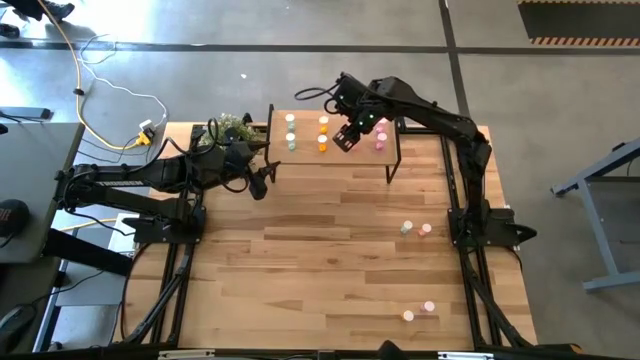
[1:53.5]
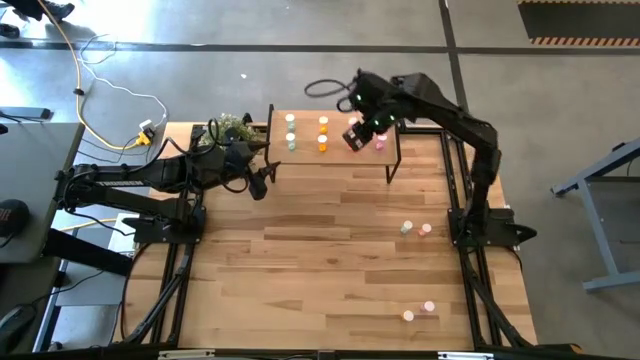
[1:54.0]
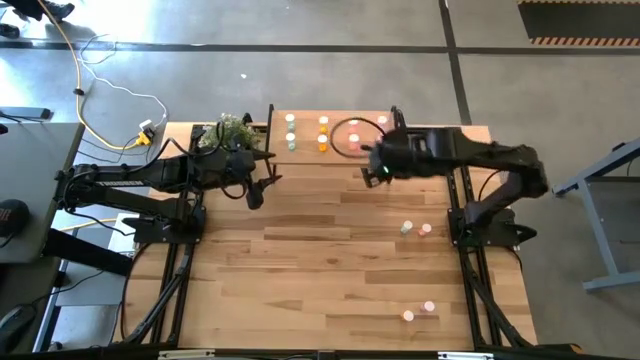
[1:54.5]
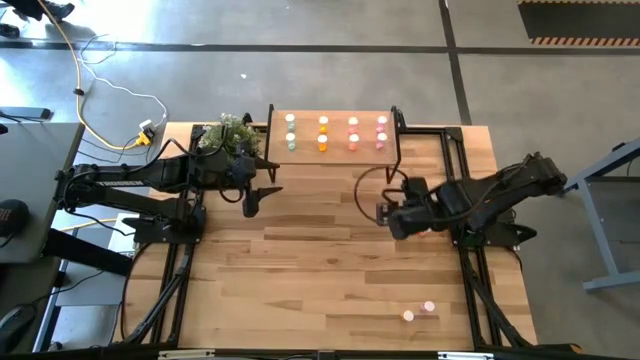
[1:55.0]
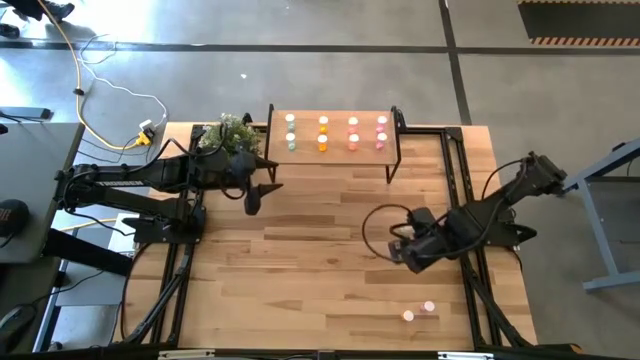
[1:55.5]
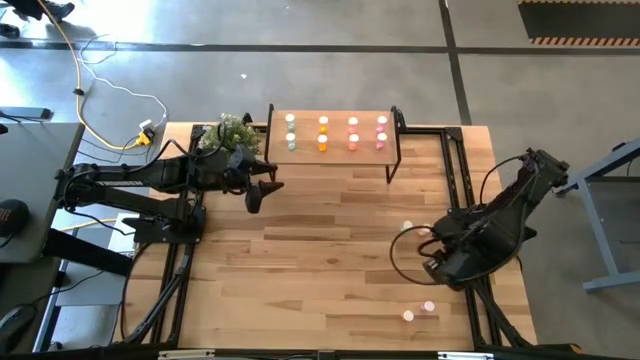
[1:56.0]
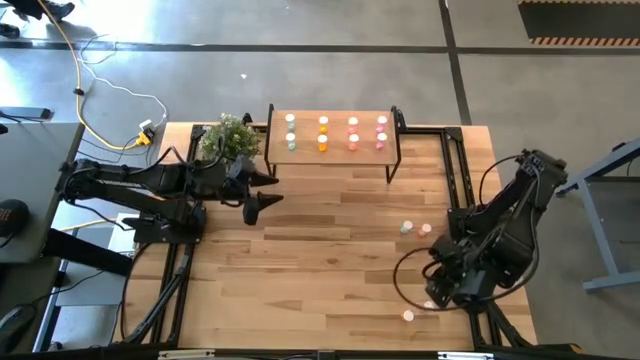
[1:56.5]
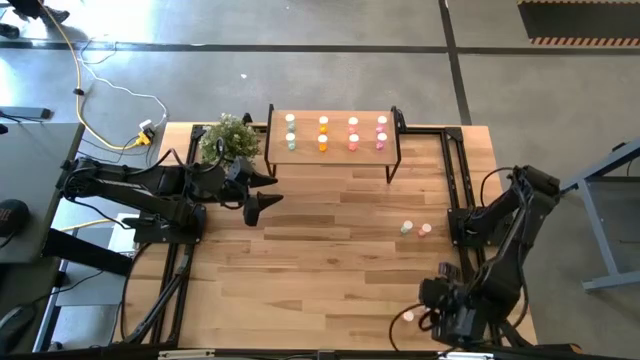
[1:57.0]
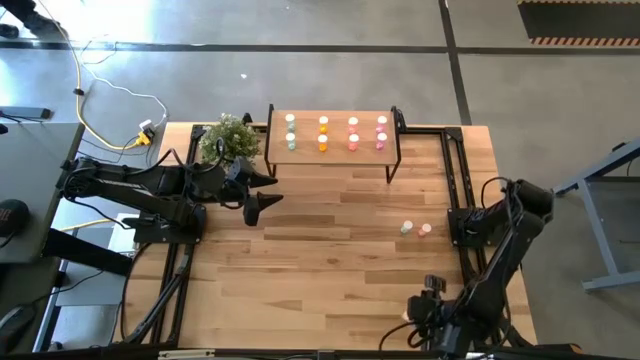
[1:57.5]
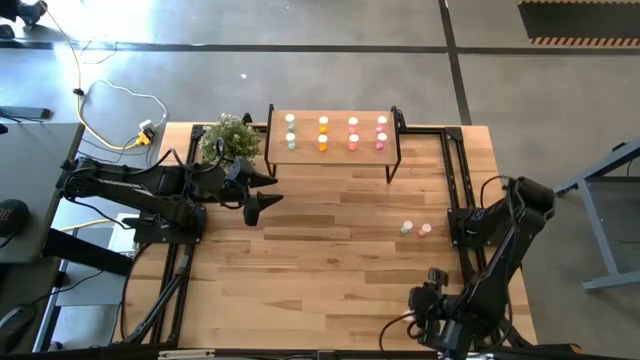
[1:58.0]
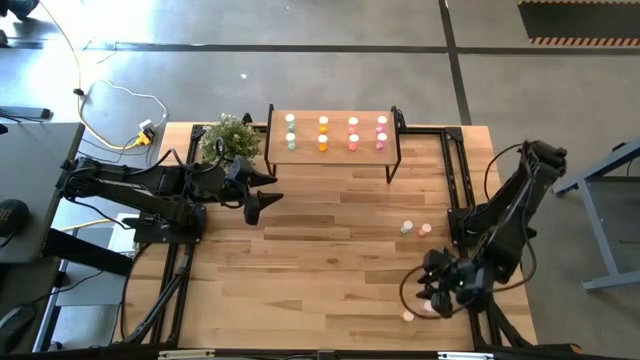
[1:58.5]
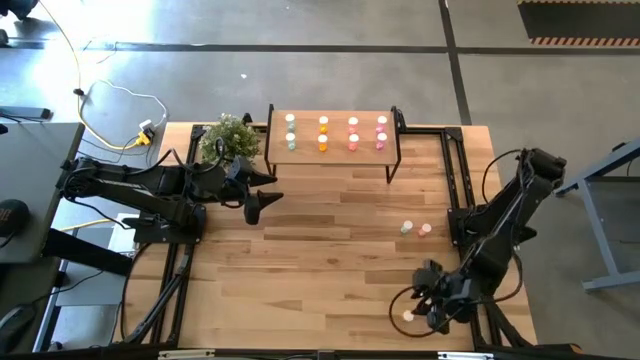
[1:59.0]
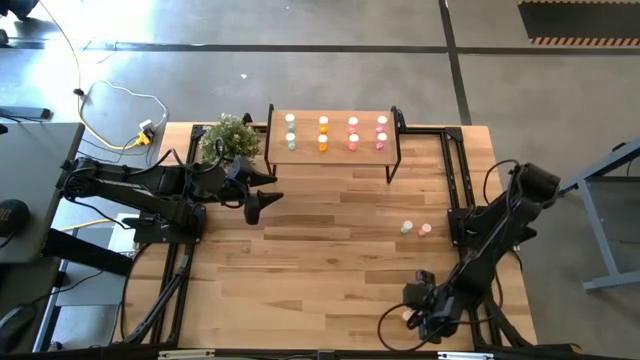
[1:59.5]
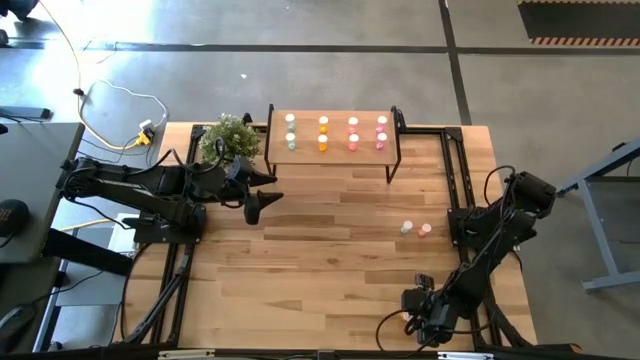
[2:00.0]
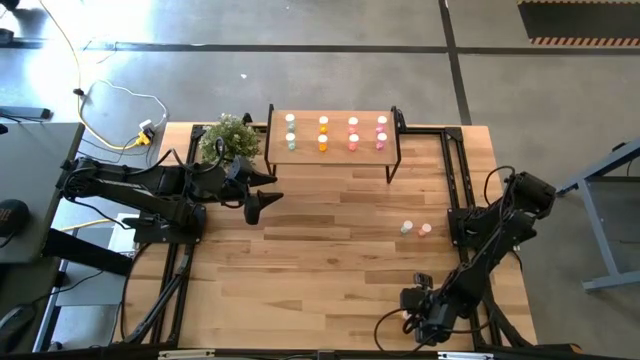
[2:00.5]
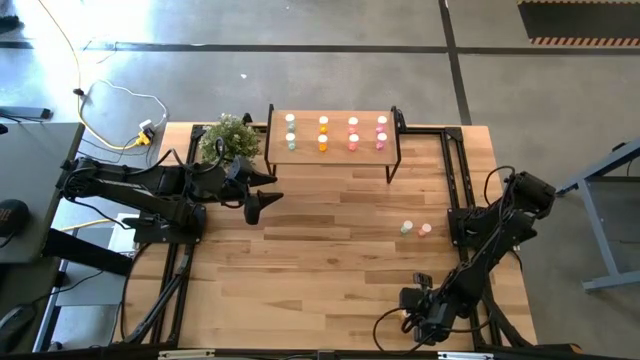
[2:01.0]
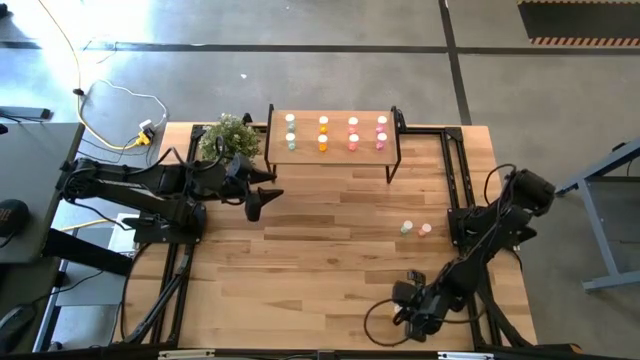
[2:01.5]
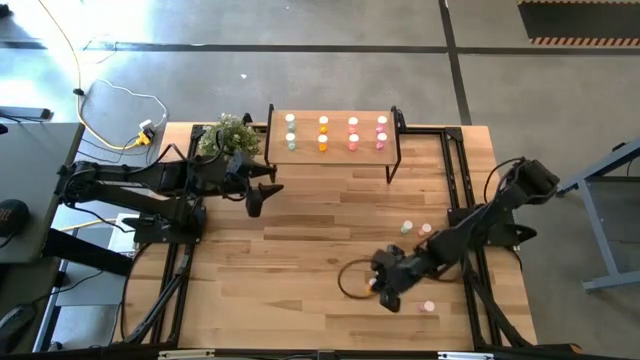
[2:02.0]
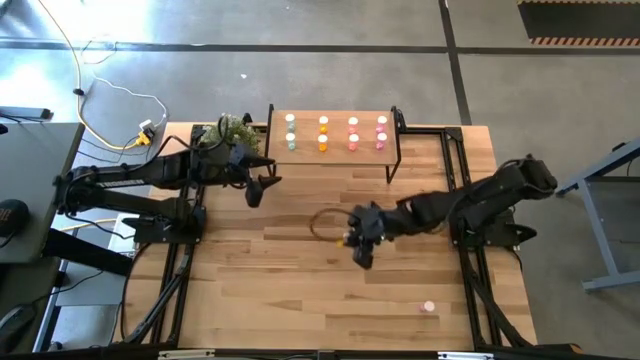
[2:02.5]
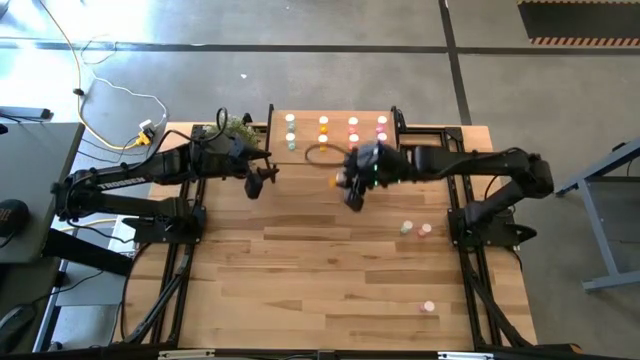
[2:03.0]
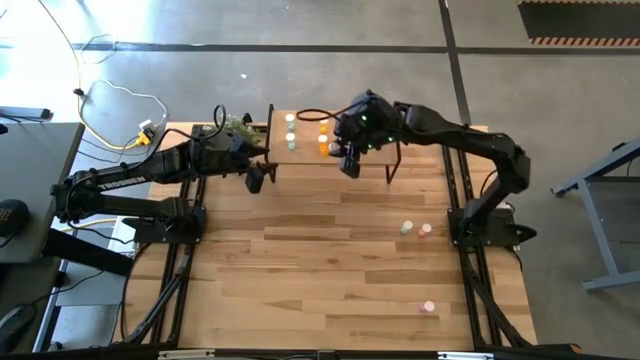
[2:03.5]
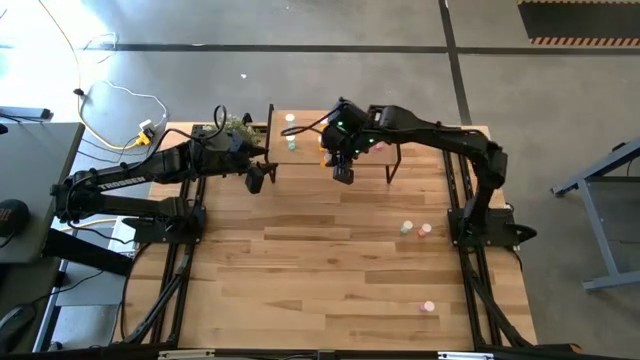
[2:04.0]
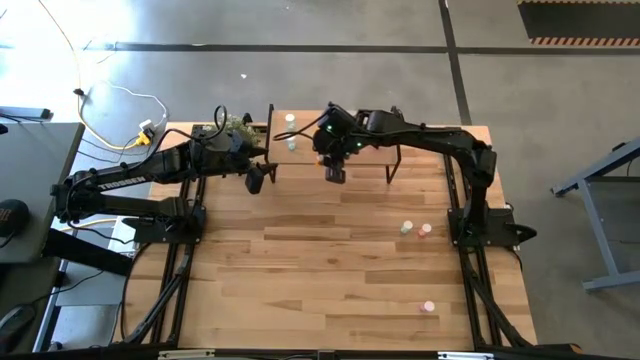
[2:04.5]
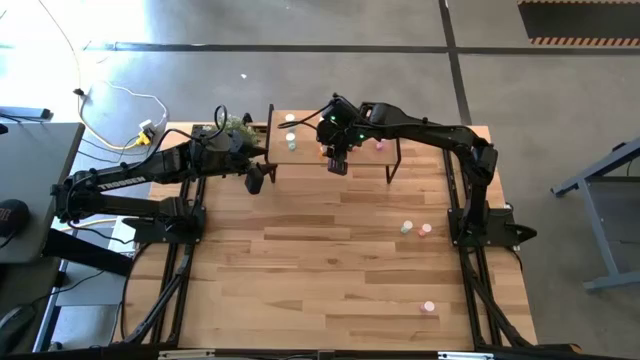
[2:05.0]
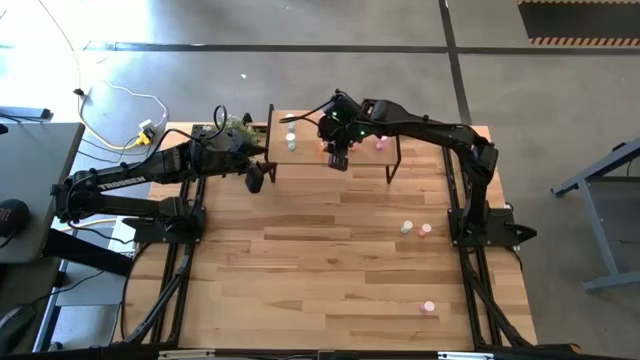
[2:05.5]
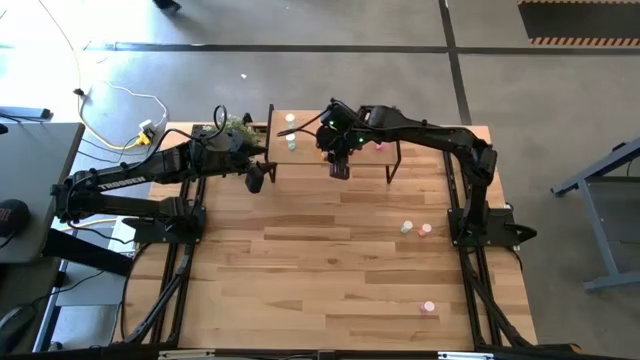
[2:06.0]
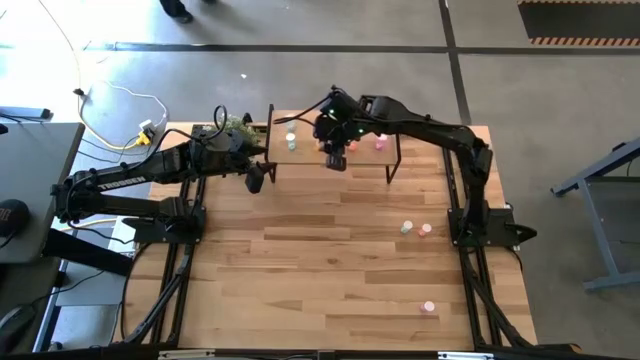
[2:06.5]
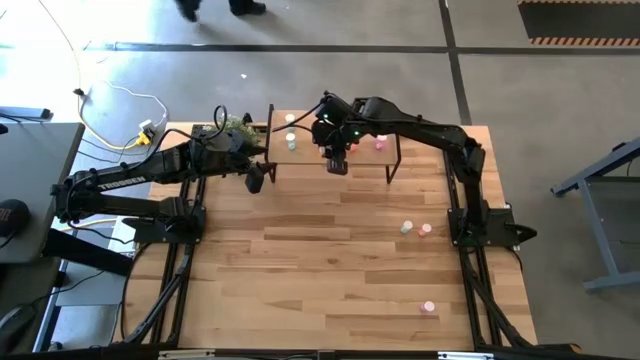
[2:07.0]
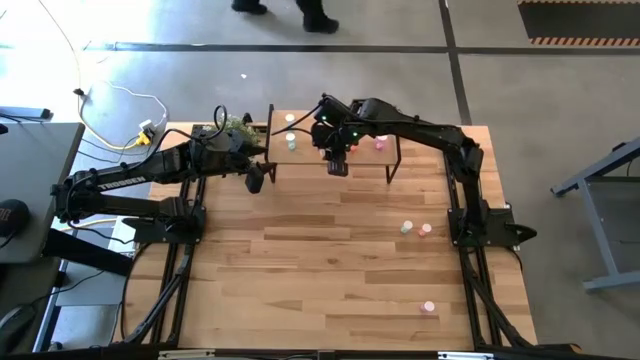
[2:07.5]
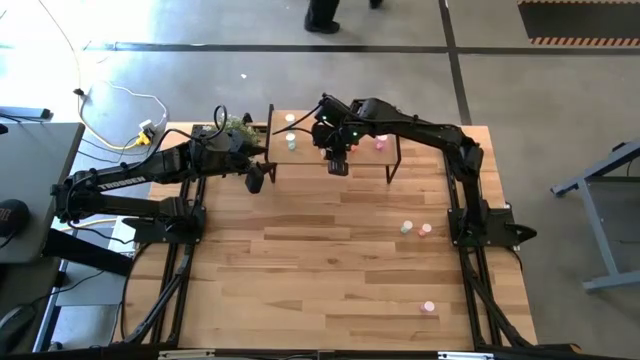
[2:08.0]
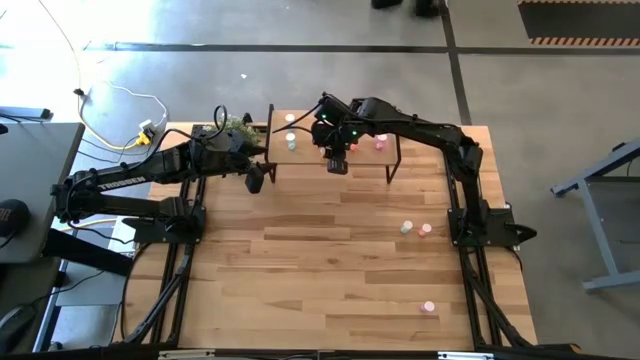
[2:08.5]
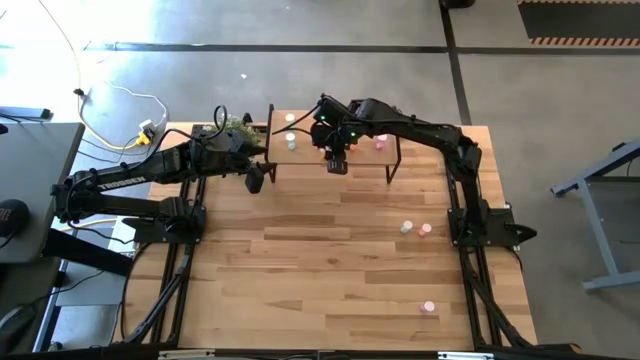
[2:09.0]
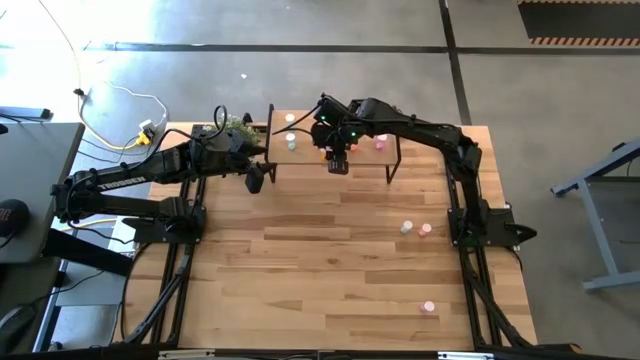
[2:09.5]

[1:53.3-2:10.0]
Task: Pick and place medicine bottles onto shelf by color
Put the yellow pill bottle on the shelf aligned with the other yellow pill bottles

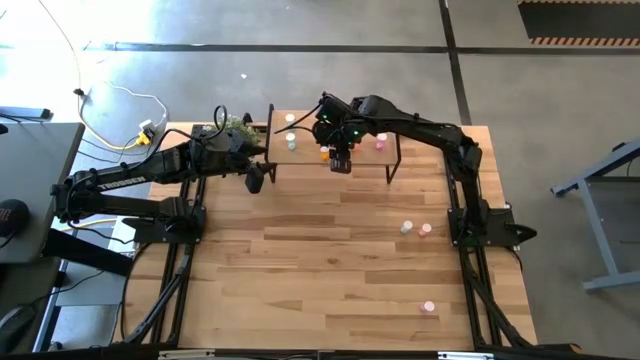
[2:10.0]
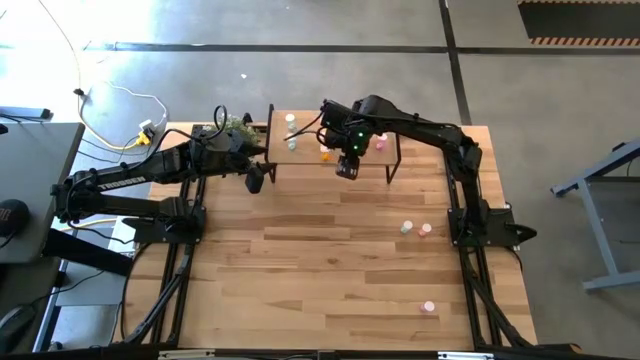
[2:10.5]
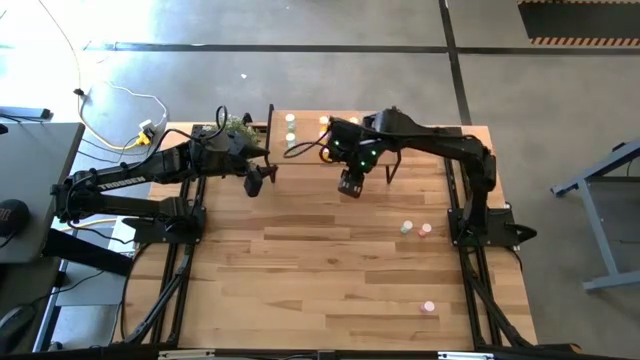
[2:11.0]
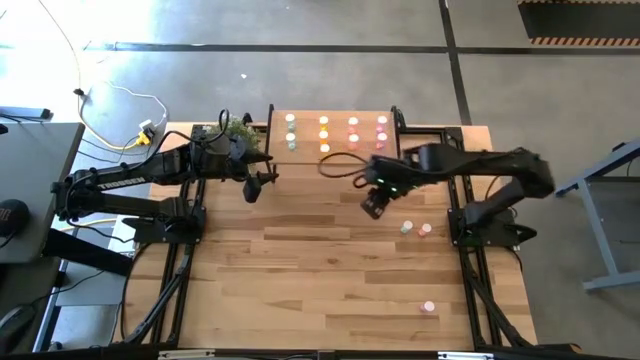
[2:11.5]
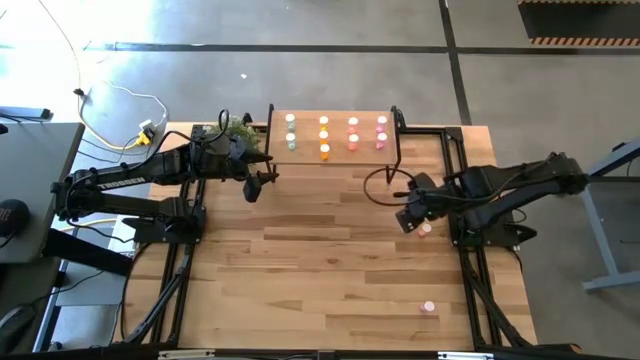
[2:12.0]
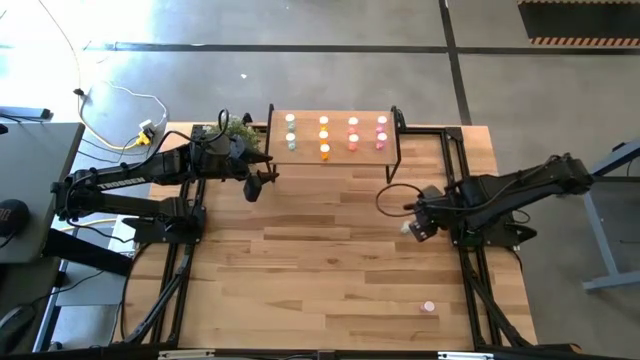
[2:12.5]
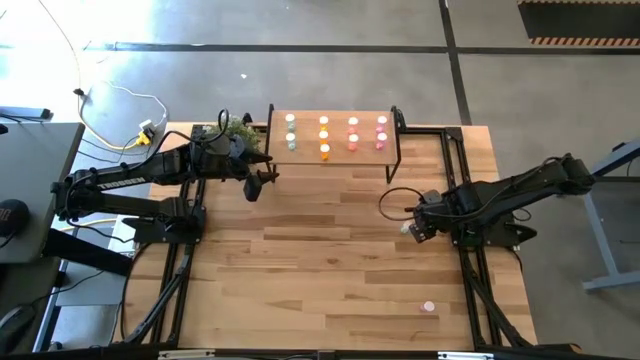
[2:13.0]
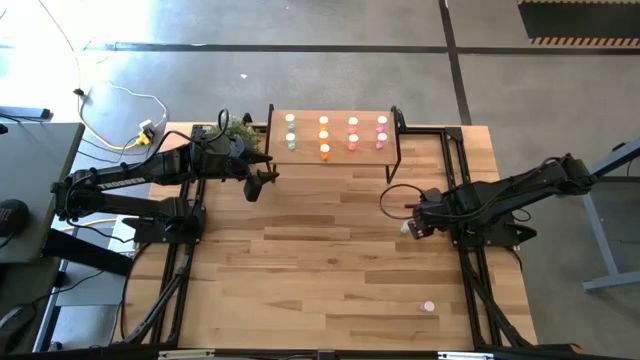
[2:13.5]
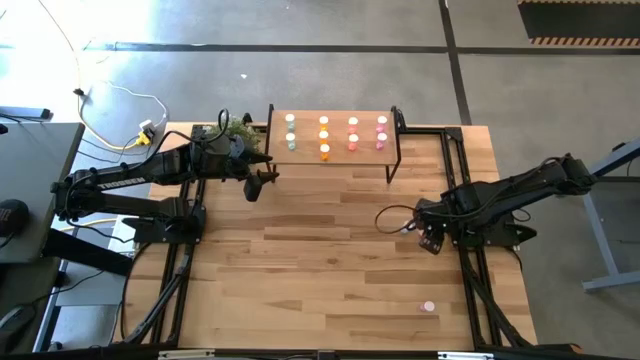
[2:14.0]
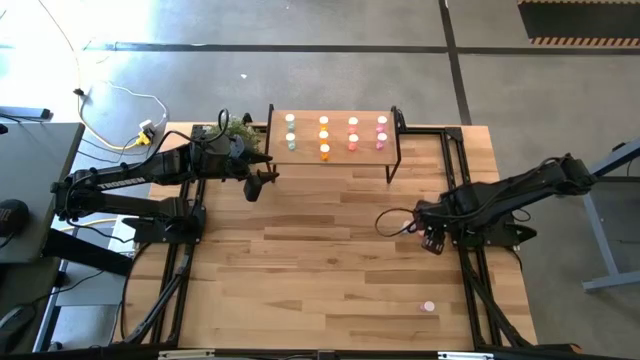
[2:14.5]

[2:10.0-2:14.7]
Put the pink pill bottle on the shelf aligned with the other pink pill bottles
